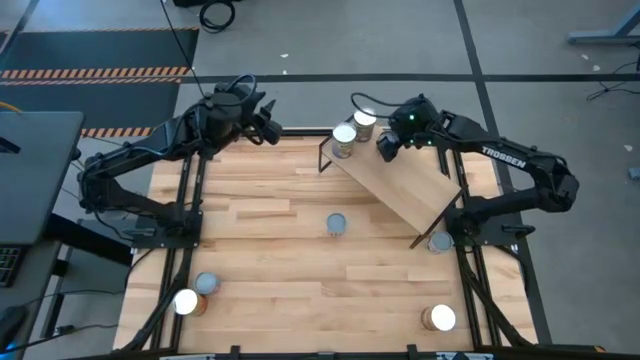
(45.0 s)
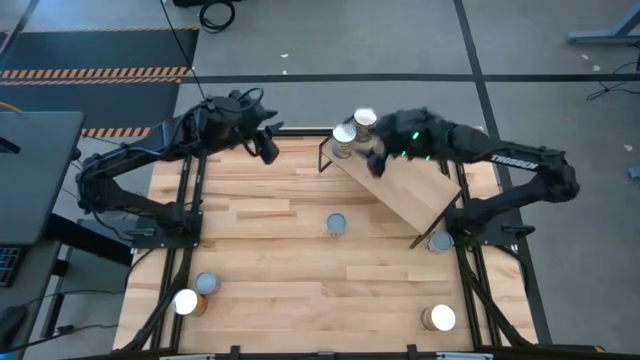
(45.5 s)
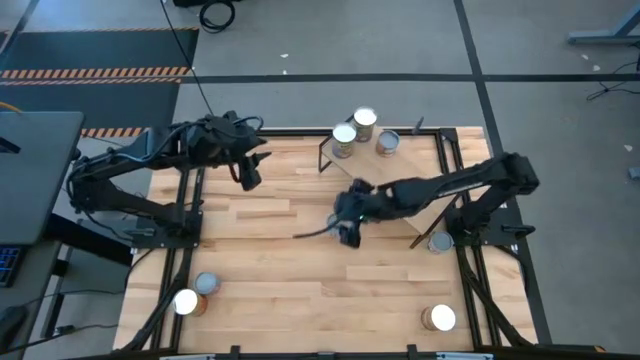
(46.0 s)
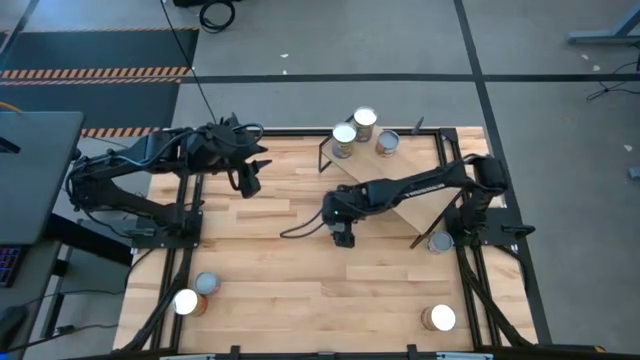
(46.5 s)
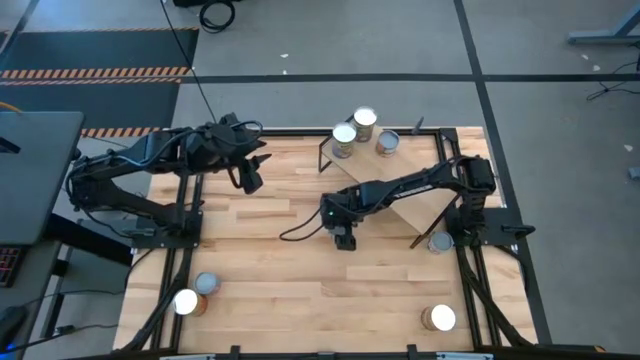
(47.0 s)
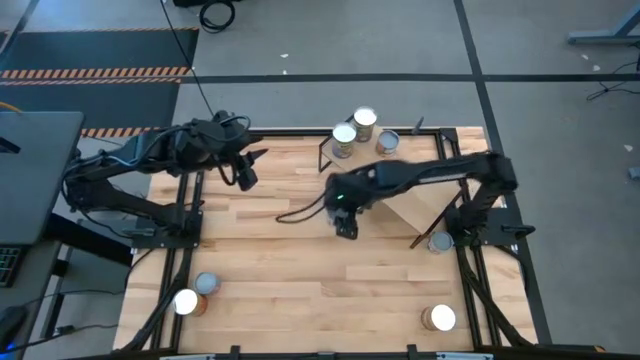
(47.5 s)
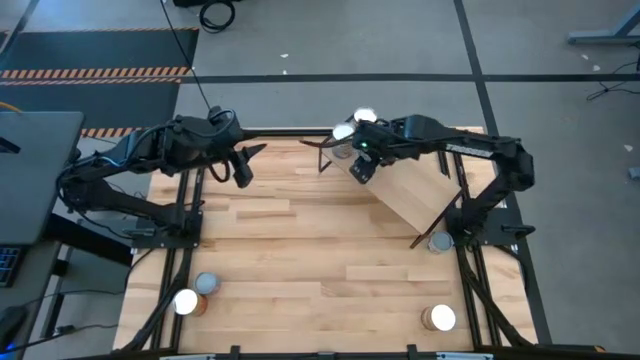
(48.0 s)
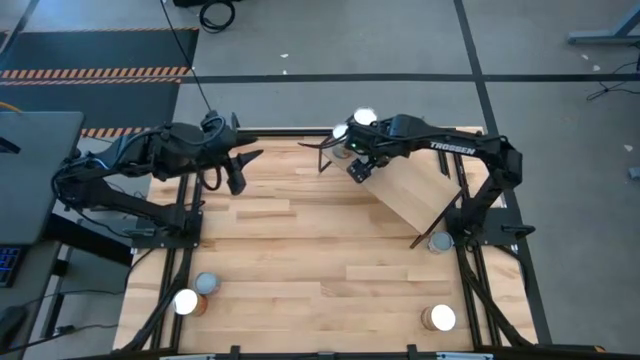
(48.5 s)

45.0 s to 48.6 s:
Task: Pick and place cans onto a shelf
Put the canned carrots can on the shelf

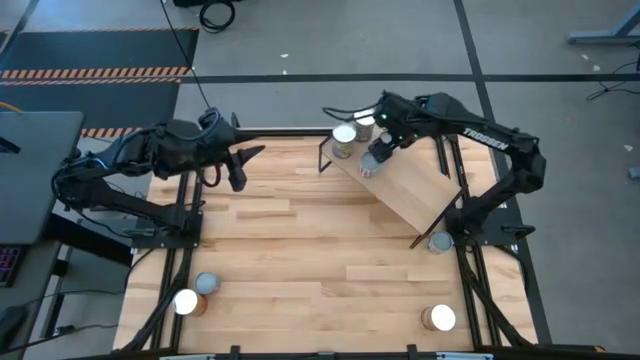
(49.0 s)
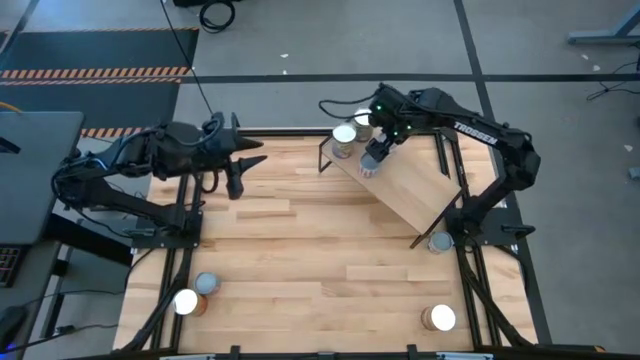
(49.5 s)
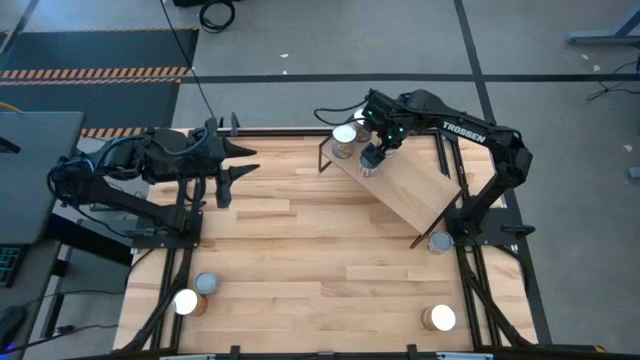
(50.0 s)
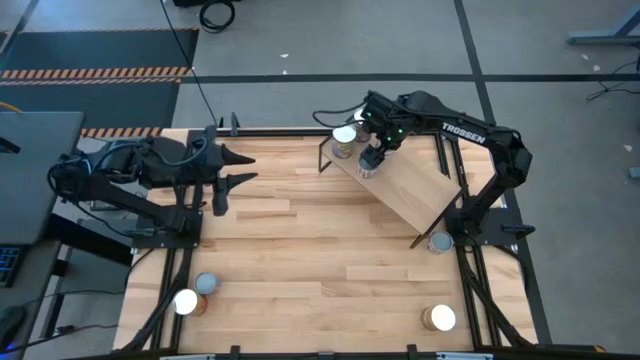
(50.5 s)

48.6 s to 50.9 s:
Adjust the cans on the shelf

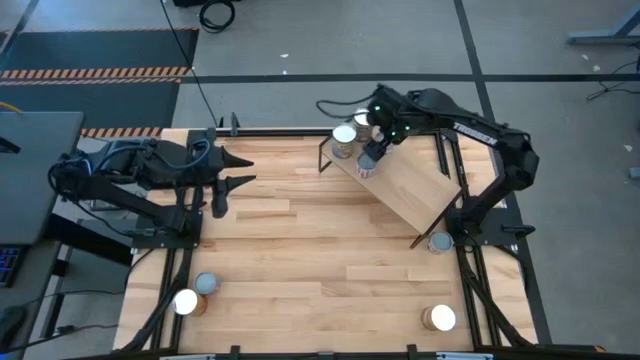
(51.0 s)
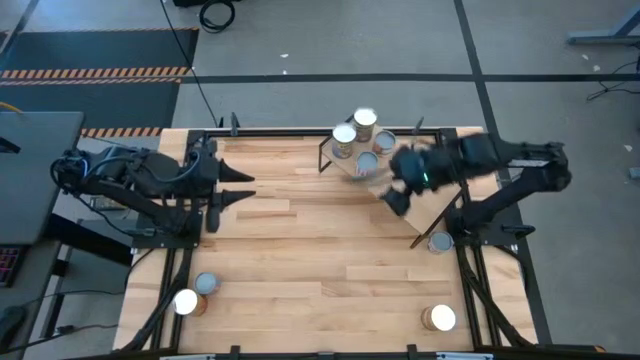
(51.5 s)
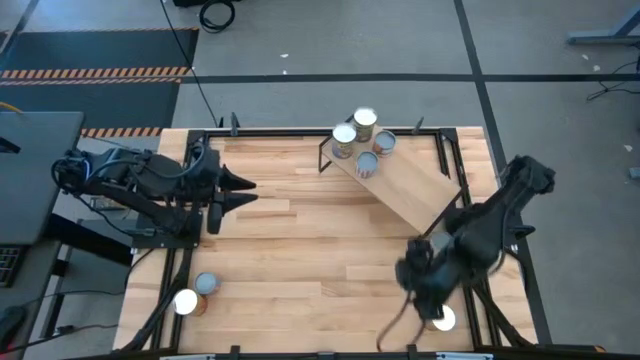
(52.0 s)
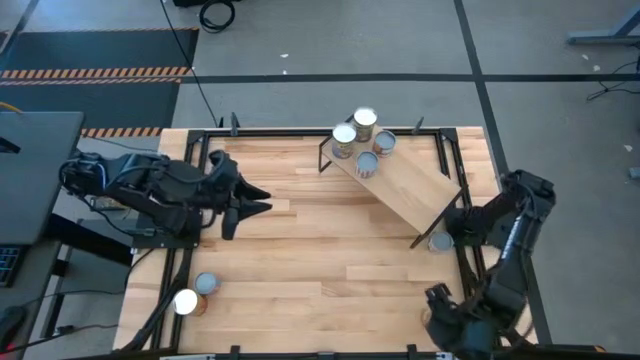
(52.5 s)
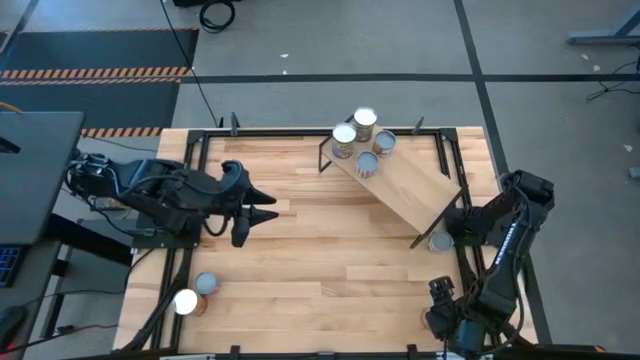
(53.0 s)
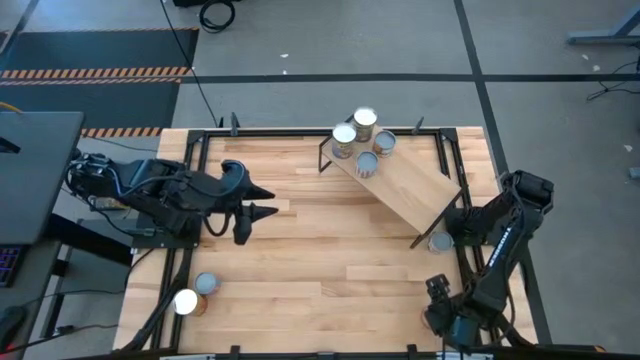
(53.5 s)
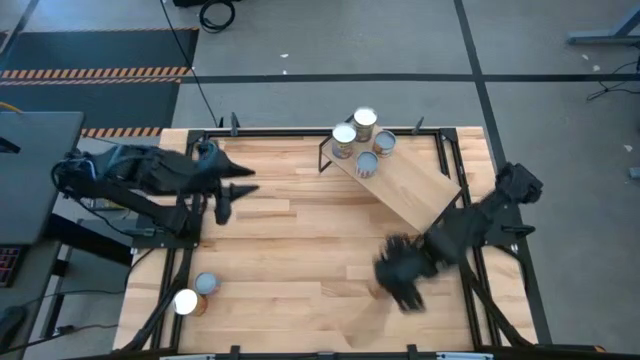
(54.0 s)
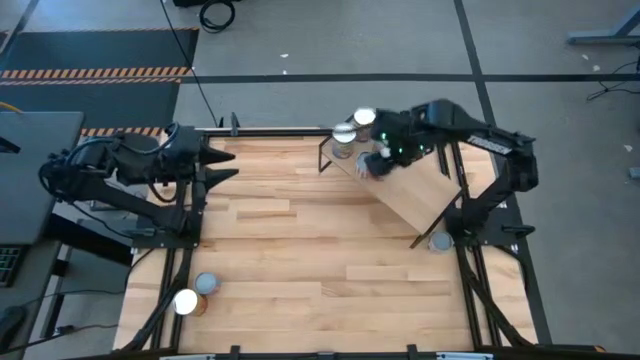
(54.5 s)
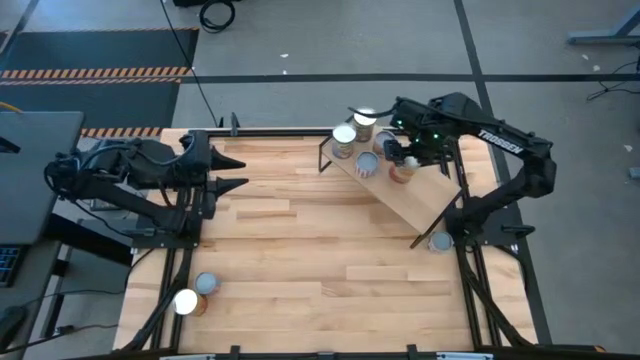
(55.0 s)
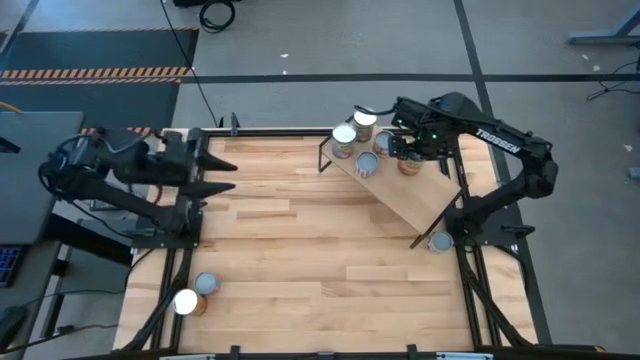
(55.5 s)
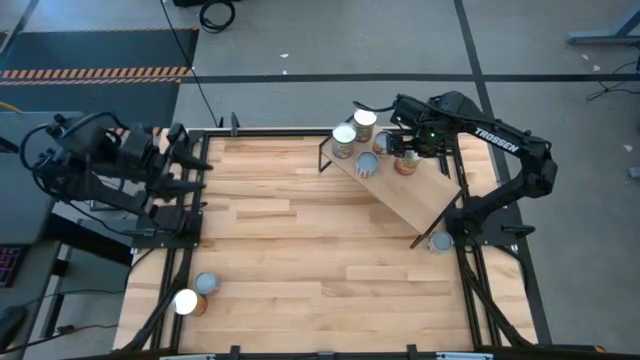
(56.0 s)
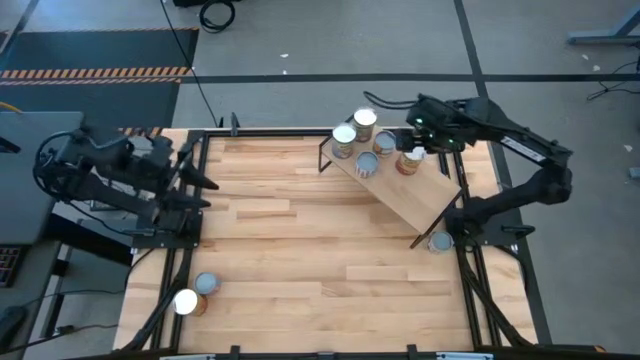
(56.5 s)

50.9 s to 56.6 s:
Put the right canned corn on the shelf

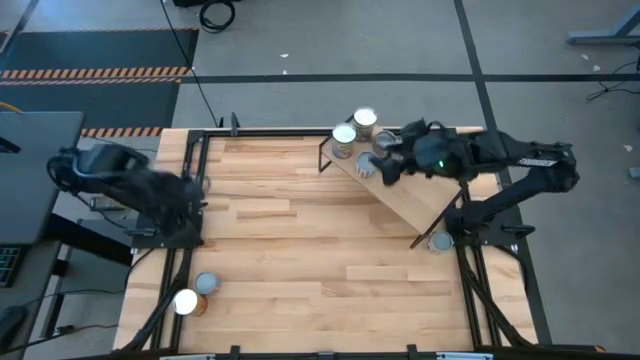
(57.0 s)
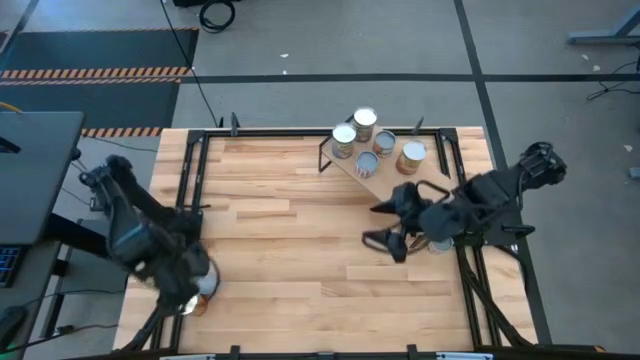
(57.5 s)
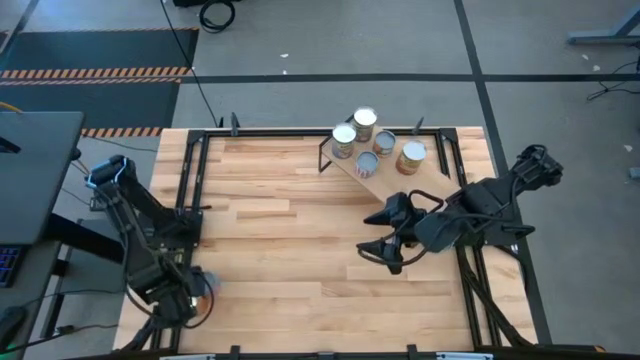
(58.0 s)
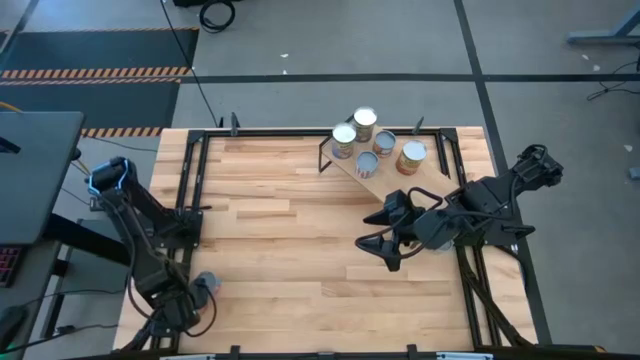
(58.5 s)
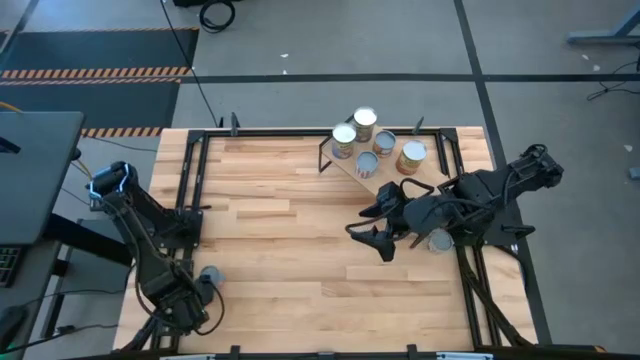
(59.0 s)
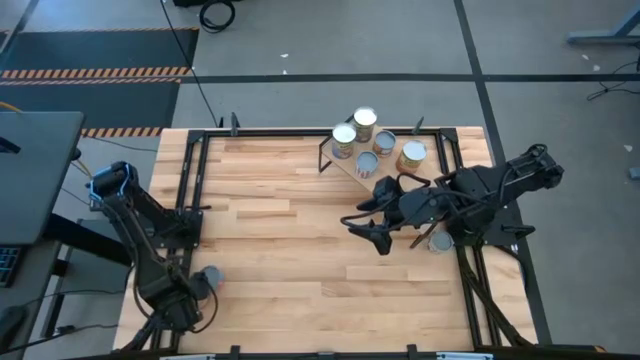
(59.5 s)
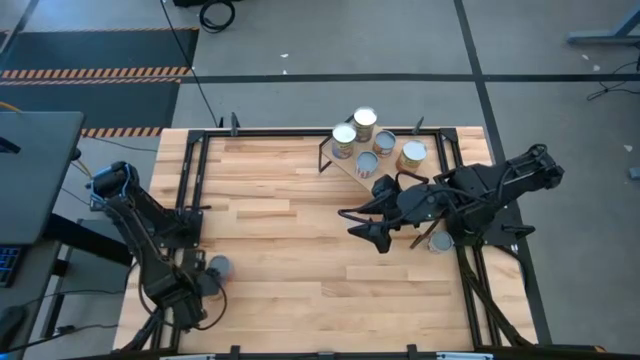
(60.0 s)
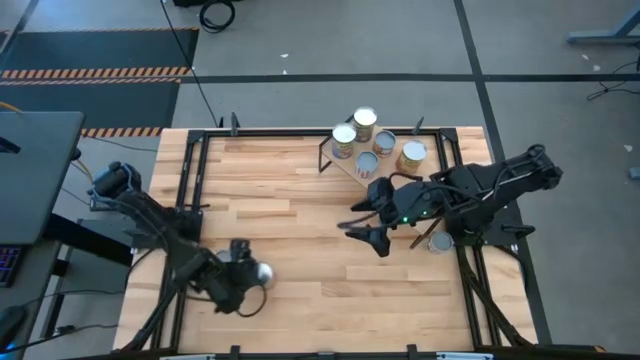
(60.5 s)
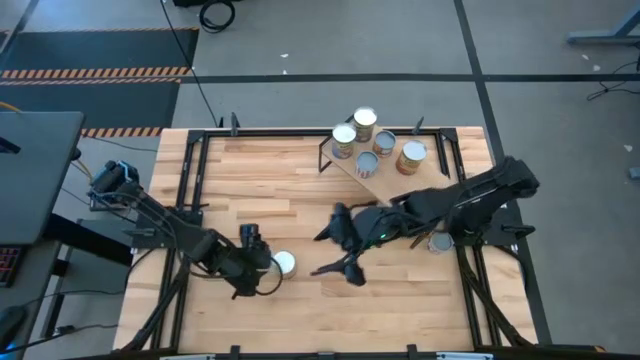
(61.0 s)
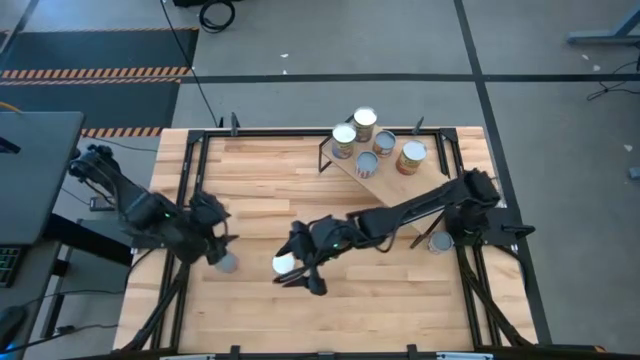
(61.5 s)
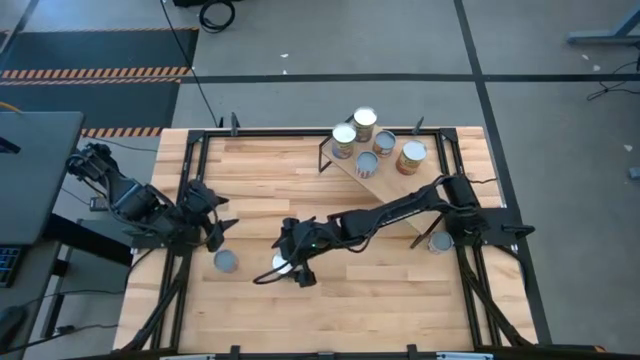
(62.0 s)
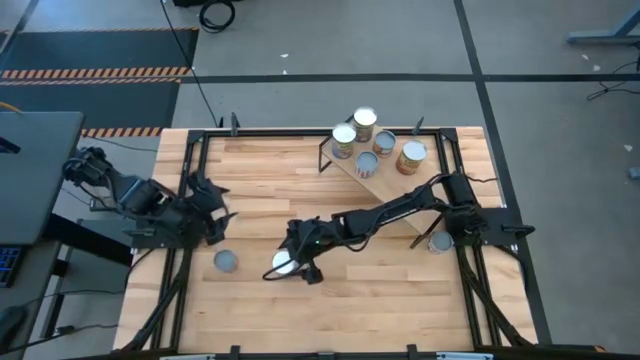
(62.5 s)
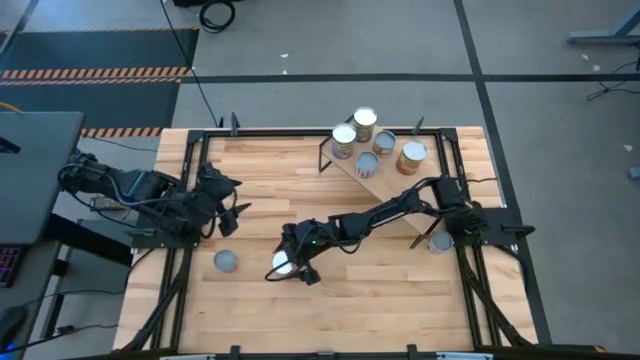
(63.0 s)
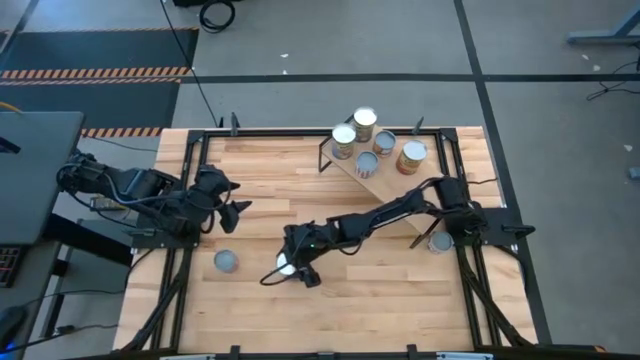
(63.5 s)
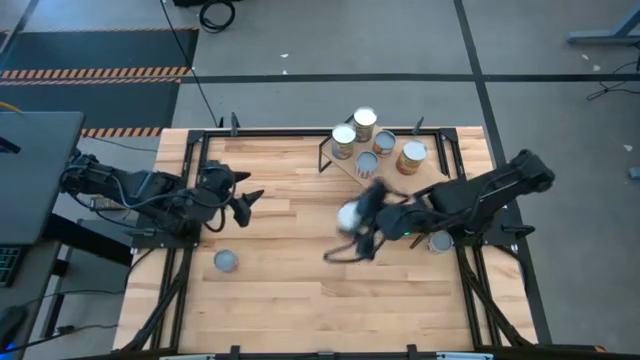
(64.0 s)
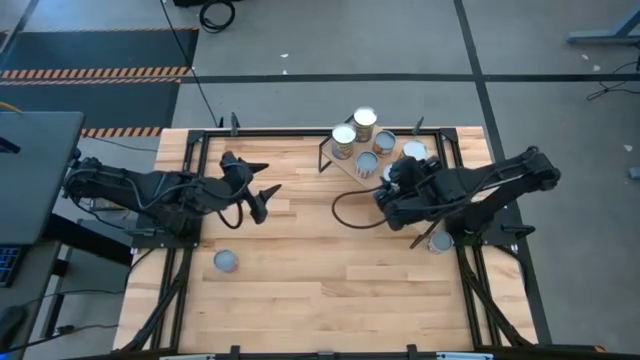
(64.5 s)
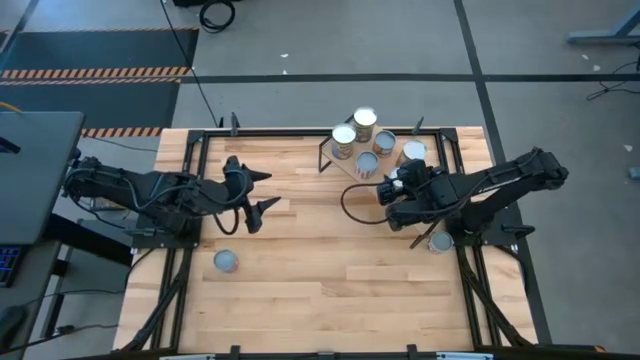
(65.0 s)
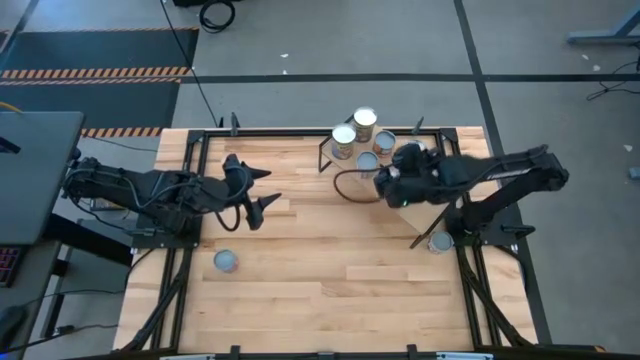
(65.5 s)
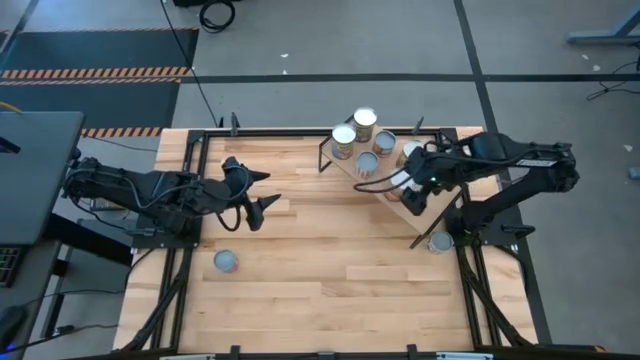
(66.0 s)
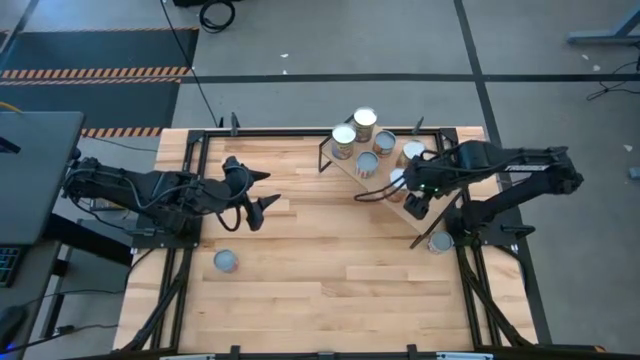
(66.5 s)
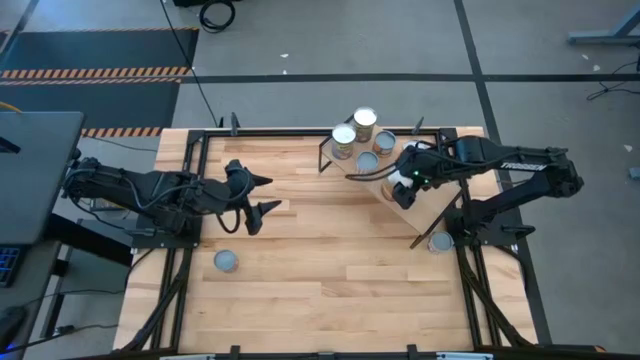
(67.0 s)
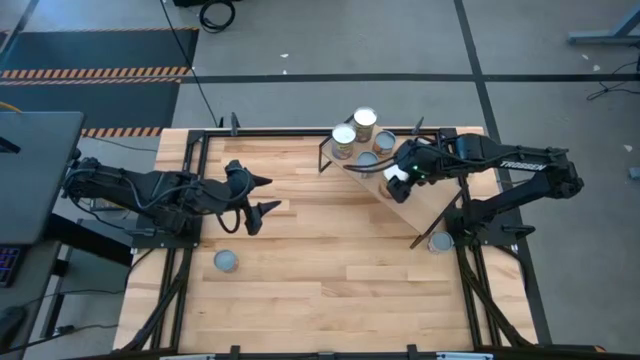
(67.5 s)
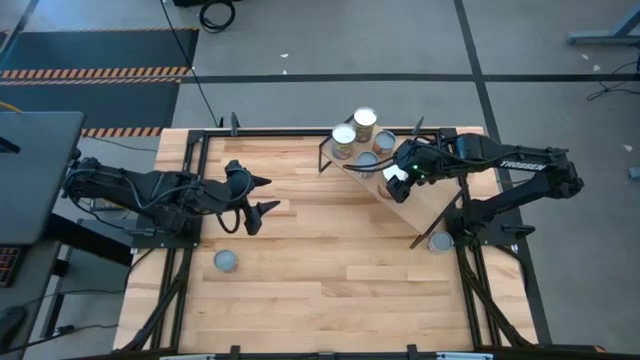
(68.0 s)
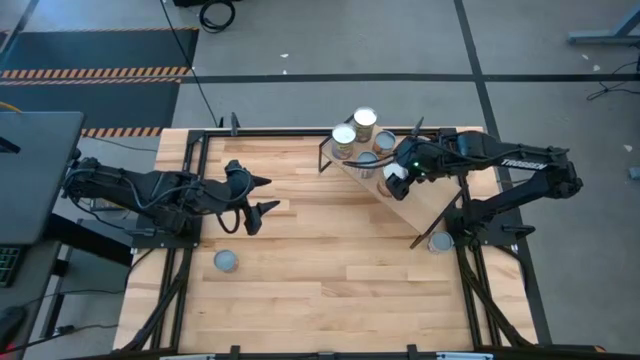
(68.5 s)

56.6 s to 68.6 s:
Put the canned corn can on the shelf
